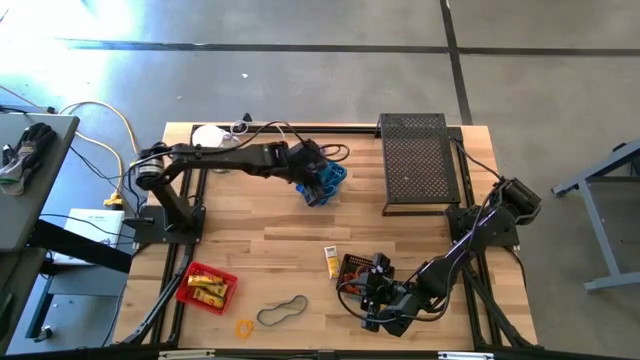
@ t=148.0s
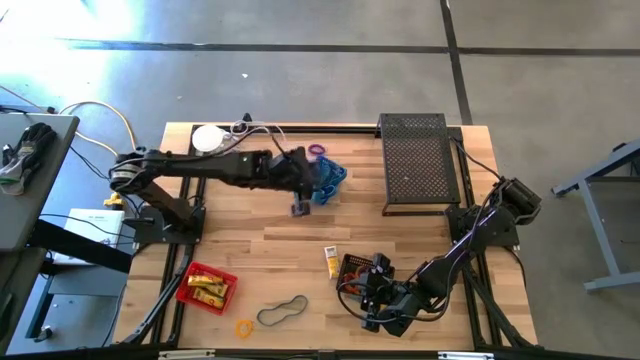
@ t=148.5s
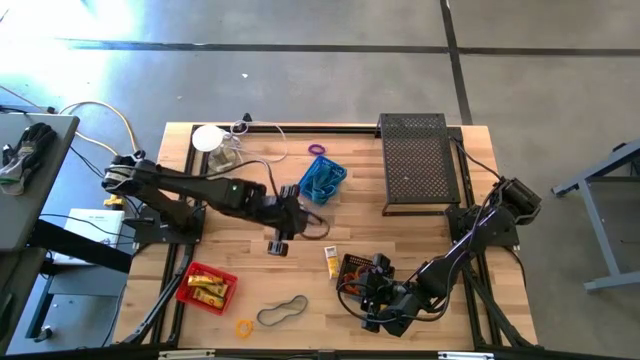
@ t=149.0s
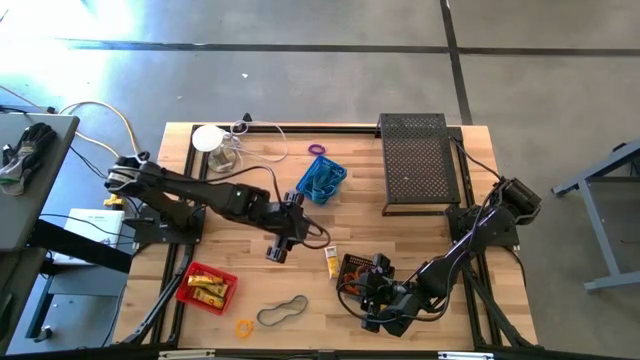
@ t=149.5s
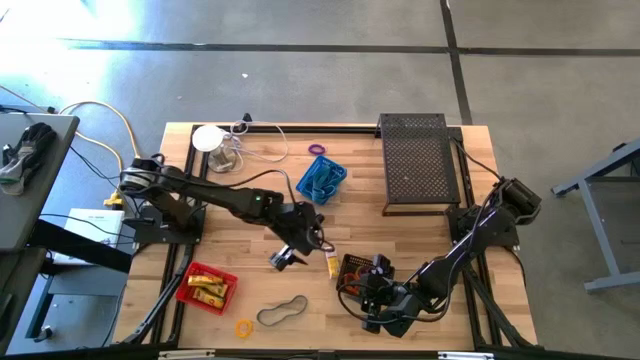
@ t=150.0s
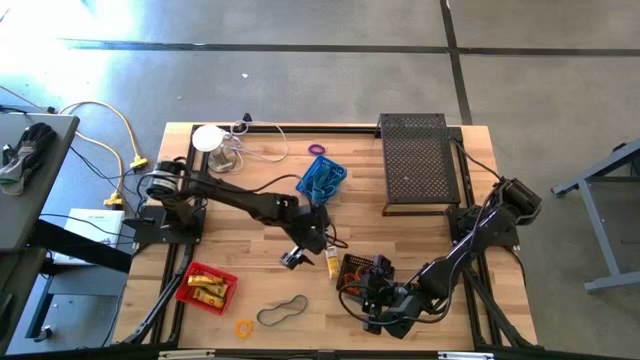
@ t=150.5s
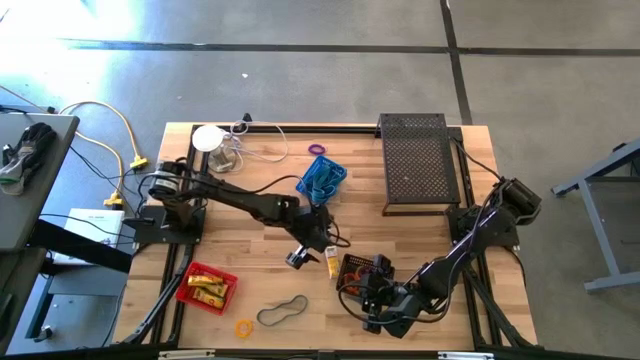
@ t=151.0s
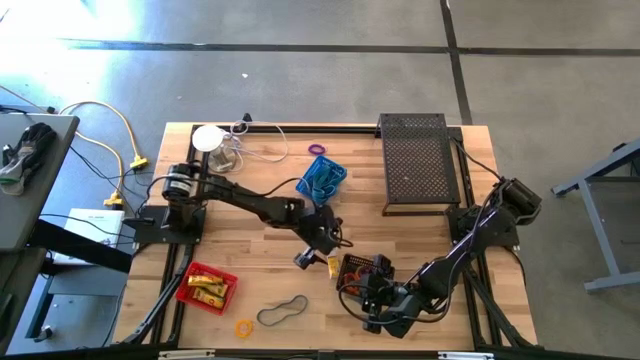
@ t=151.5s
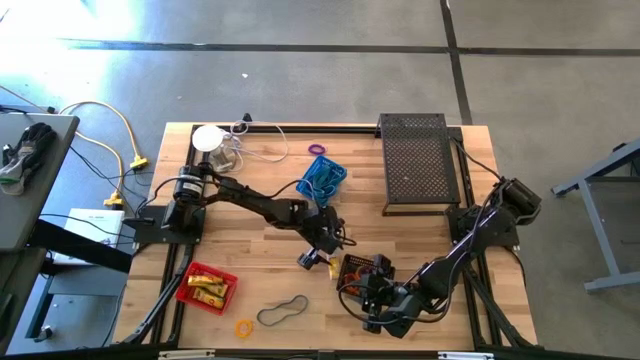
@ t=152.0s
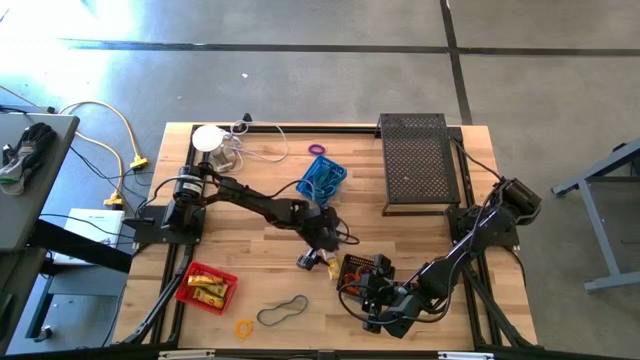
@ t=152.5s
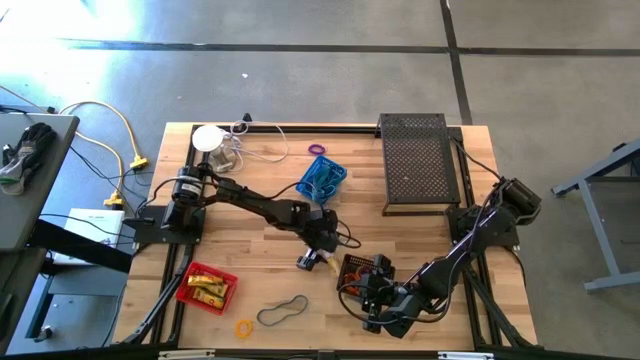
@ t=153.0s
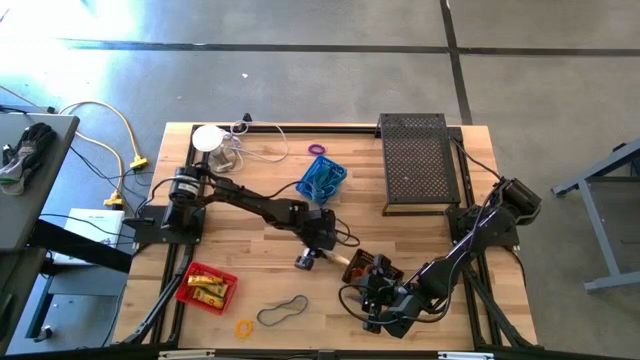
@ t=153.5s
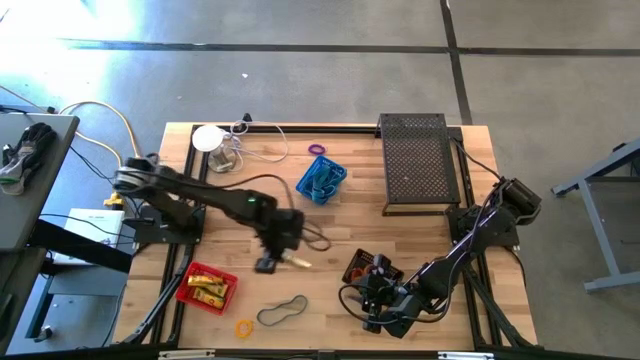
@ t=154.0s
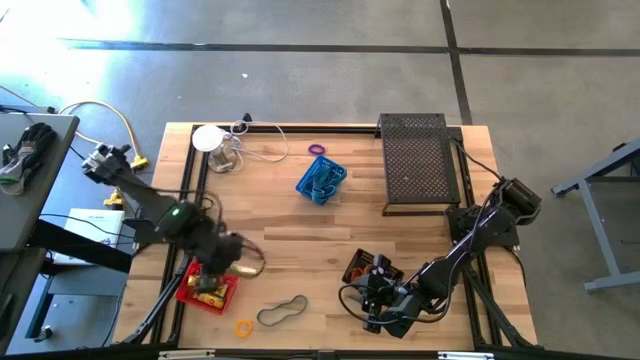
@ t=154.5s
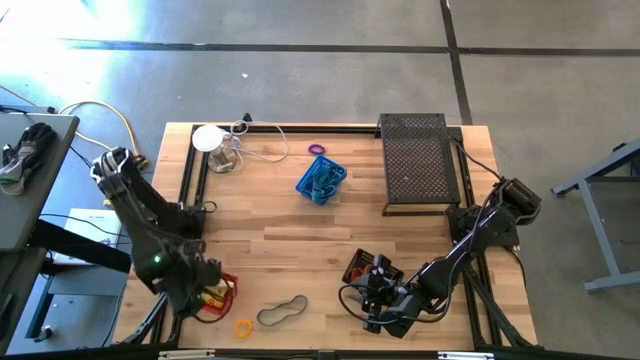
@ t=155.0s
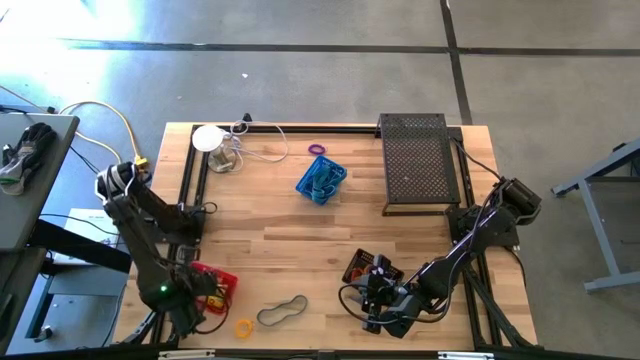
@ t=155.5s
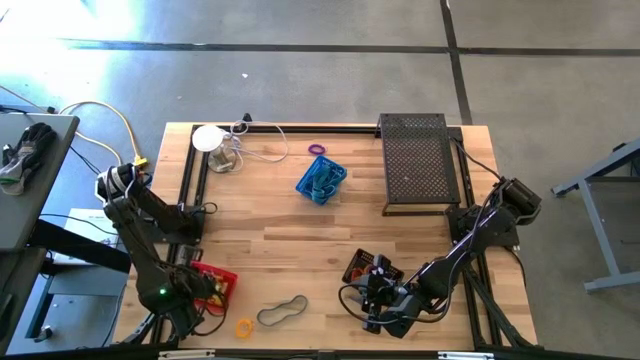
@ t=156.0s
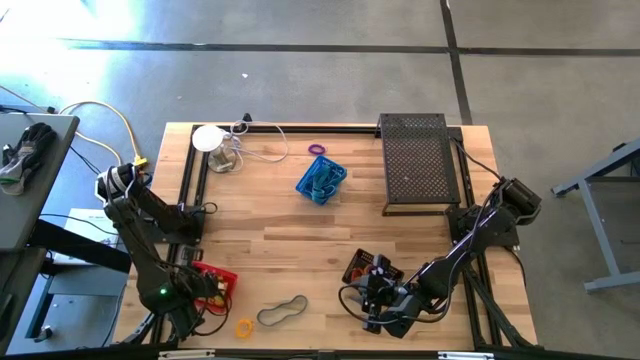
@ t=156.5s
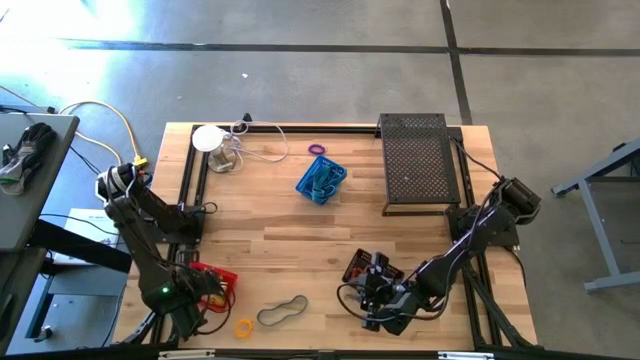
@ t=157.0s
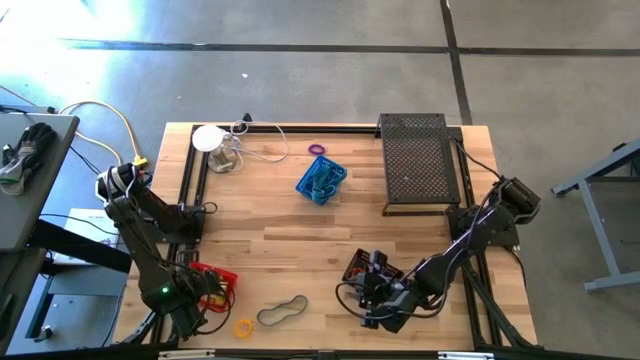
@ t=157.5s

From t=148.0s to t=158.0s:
Task: Pick & Place Office Desk Supplies
Put the crayon box into the red bin

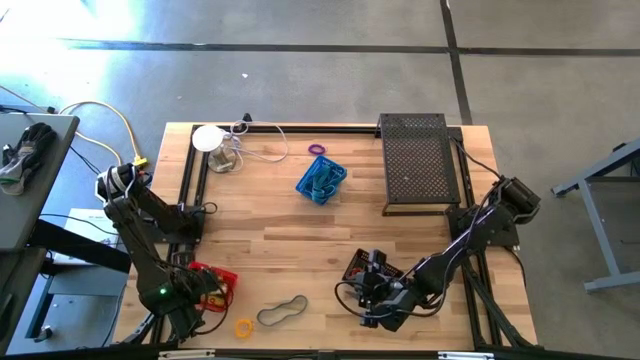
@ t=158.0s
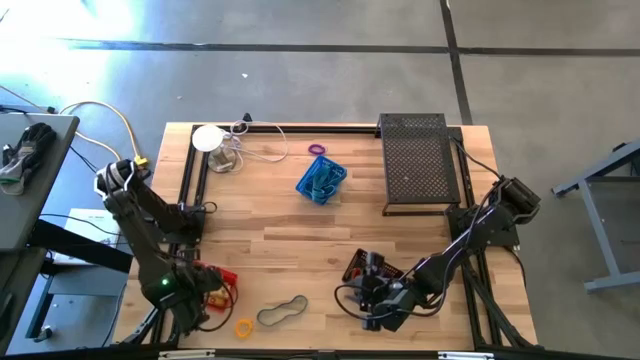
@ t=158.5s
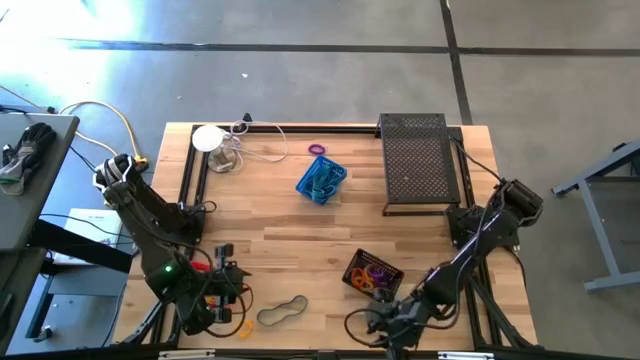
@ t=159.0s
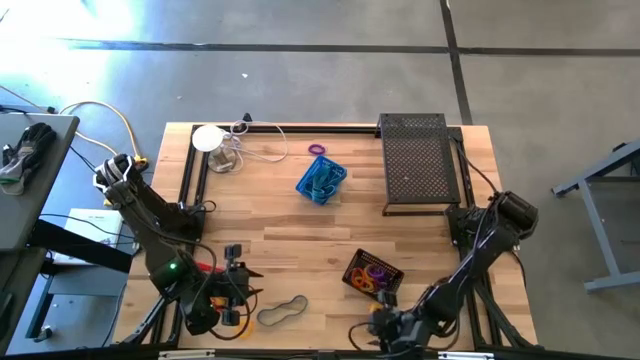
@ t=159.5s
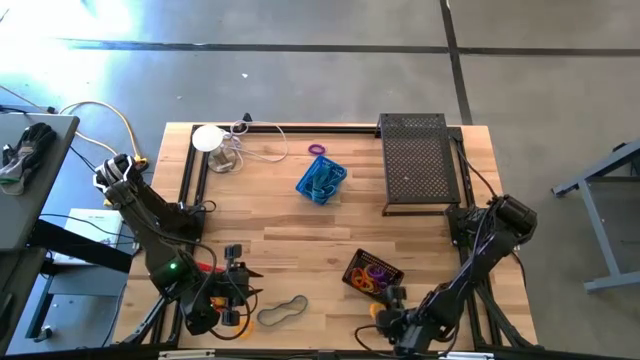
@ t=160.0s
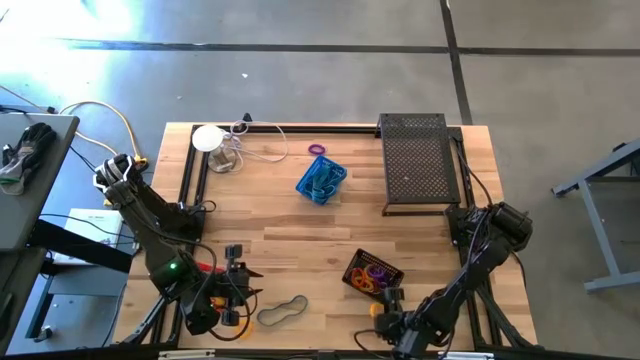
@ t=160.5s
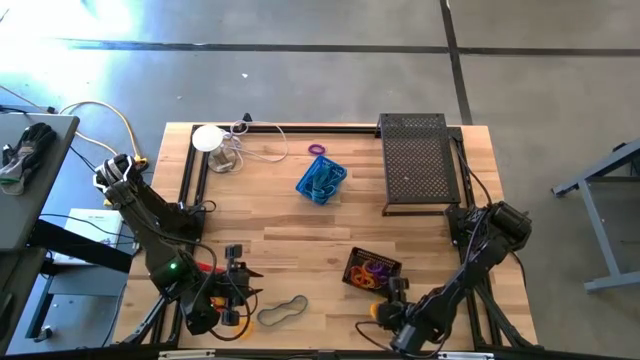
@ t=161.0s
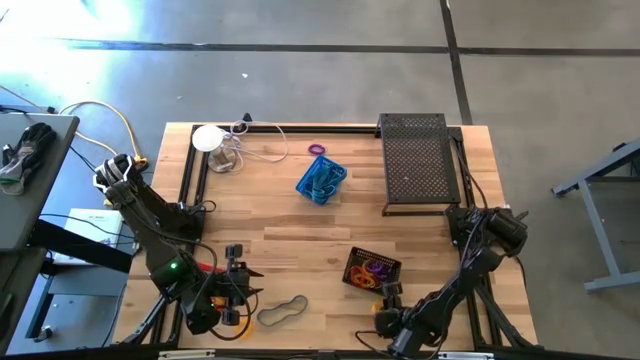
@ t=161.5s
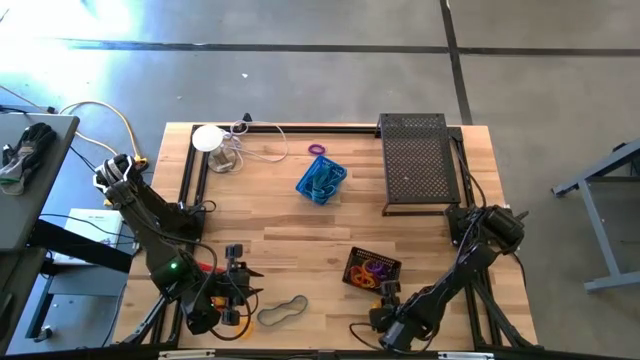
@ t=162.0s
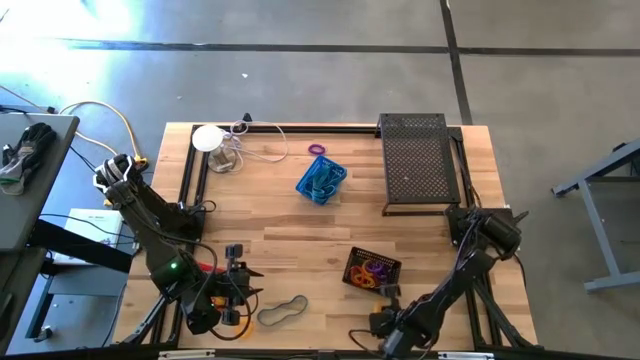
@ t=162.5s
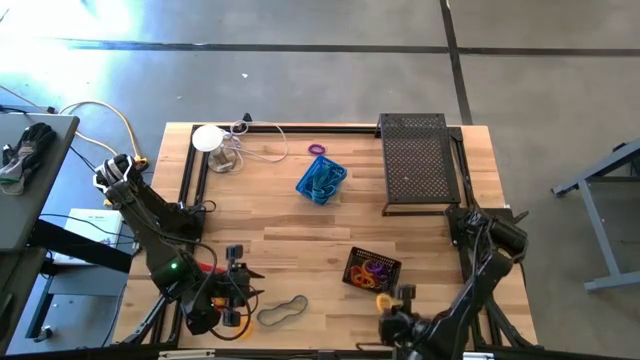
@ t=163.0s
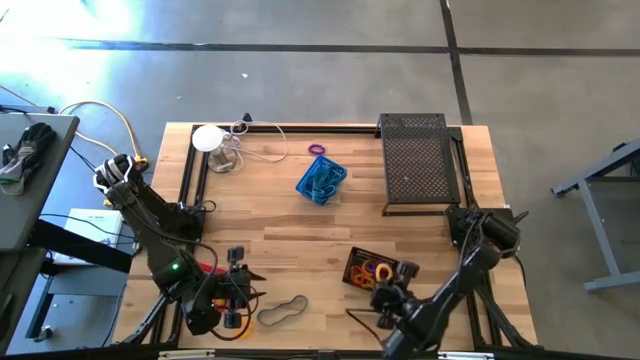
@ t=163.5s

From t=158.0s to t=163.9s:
Put the bottom right yellow wrist coil keychain into the black bin

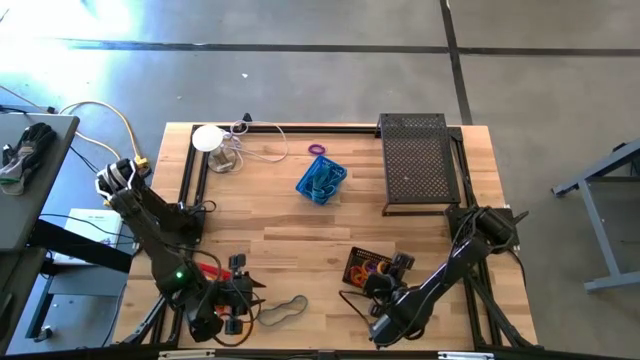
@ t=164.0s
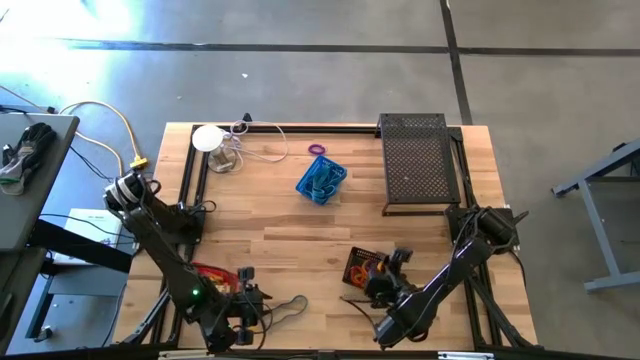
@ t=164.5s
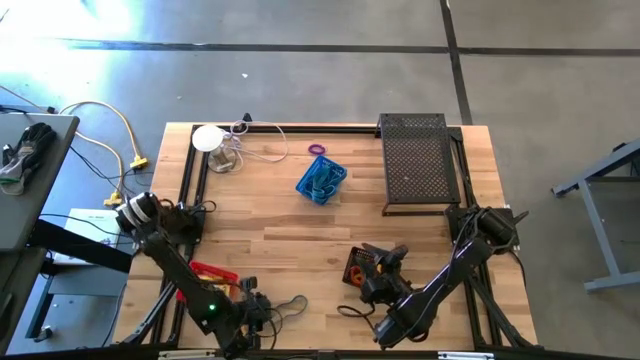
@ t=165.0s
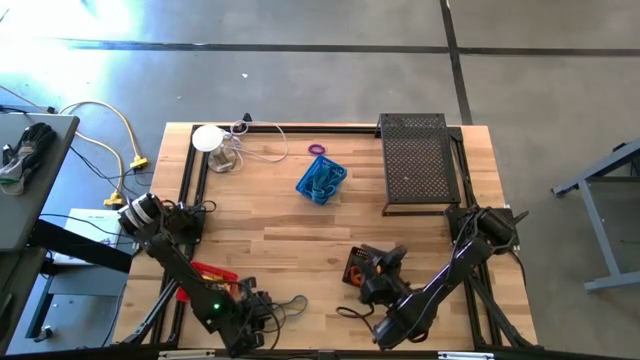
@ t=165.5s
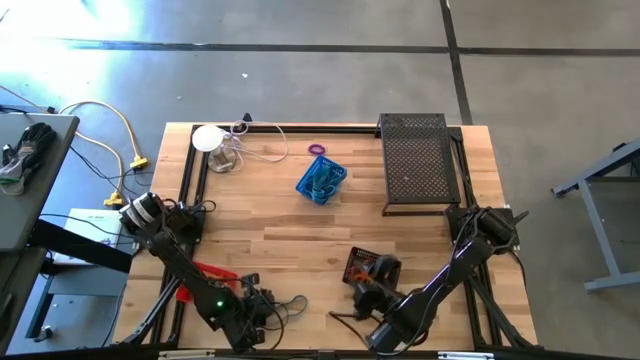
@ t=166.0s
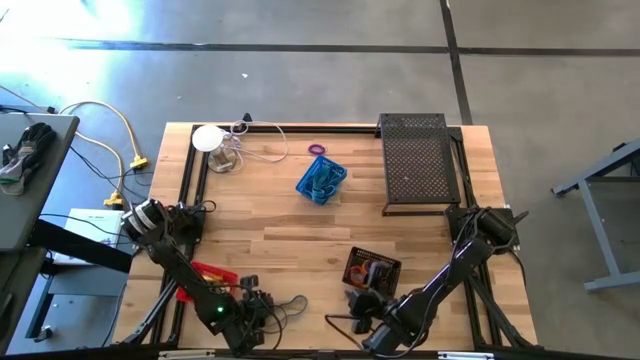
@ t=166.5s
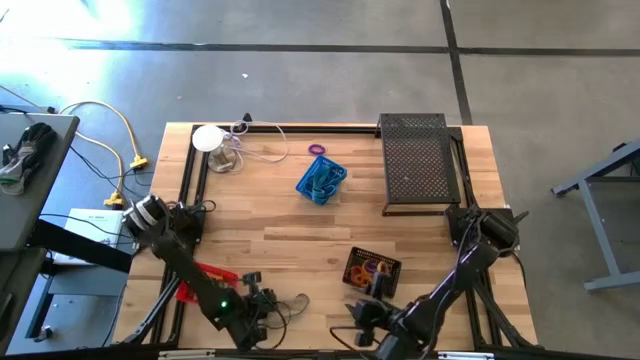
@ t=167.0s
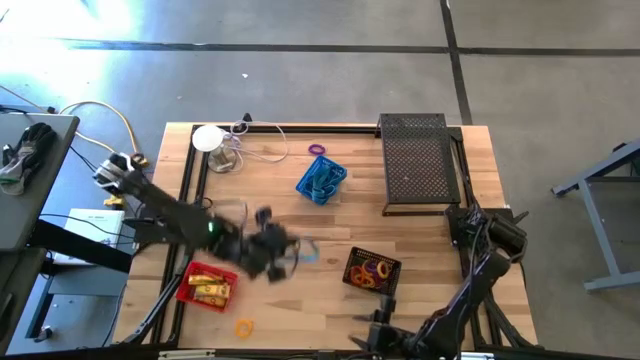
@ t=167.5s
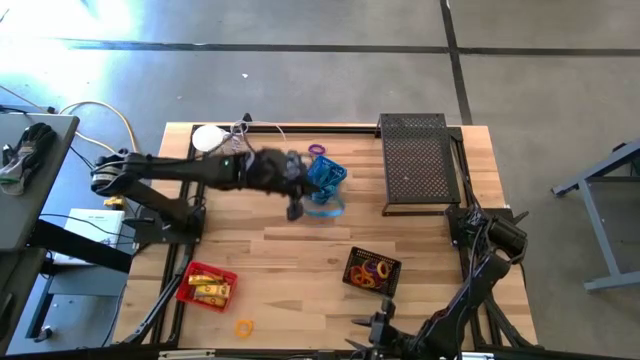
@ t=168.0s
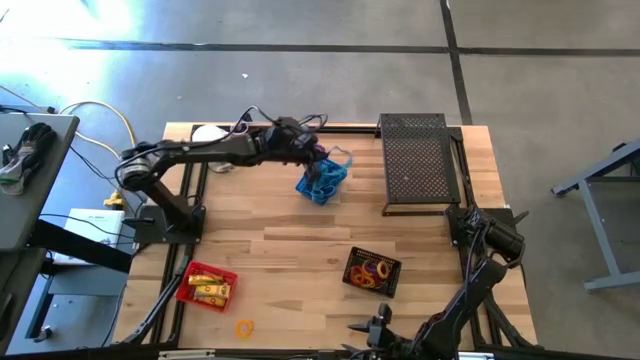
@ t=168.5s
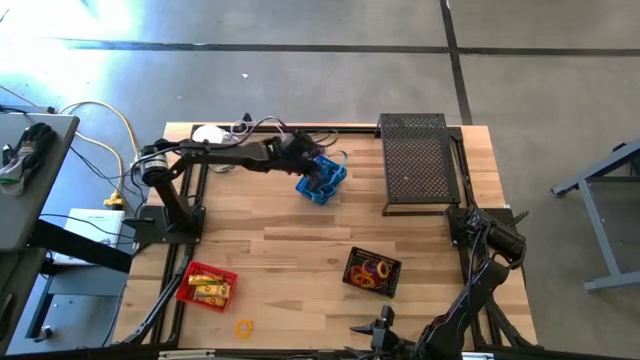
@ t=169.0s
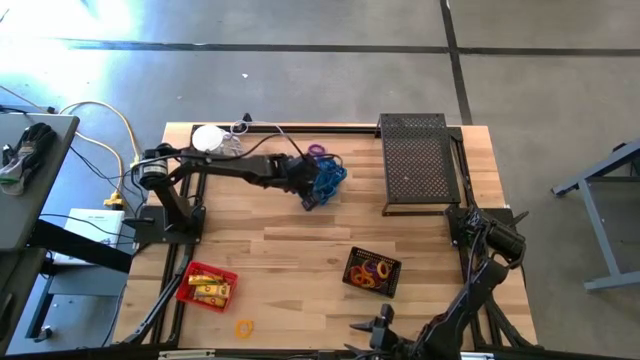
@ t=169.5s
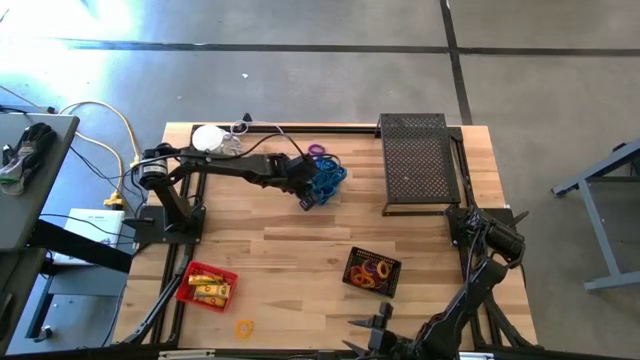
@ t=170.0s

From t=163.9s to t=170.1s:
Put the blue rubber band into the blue bin
